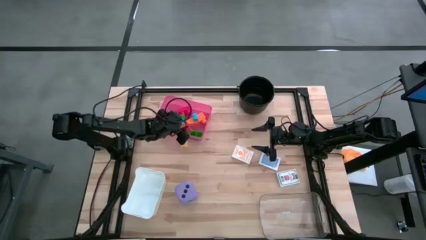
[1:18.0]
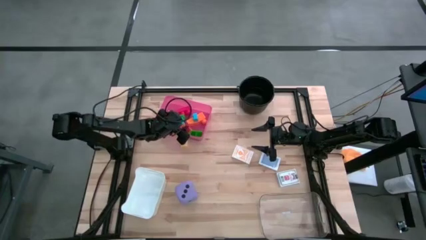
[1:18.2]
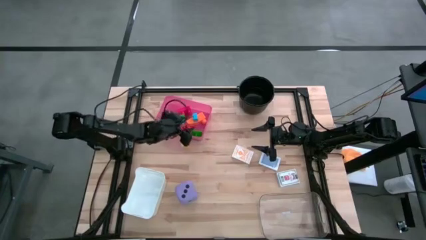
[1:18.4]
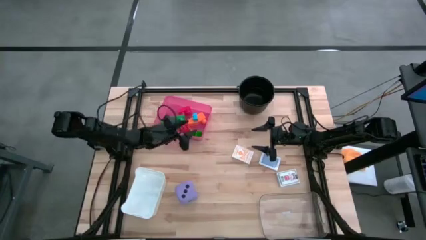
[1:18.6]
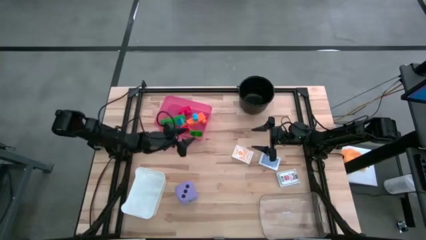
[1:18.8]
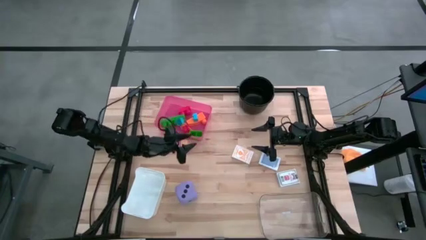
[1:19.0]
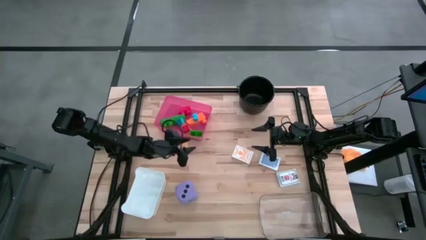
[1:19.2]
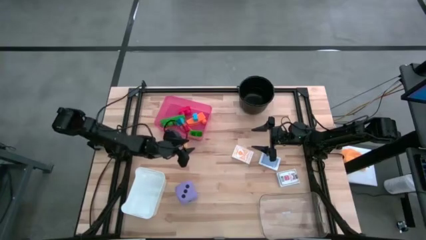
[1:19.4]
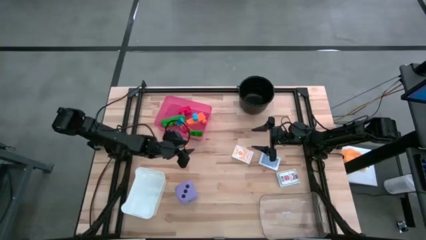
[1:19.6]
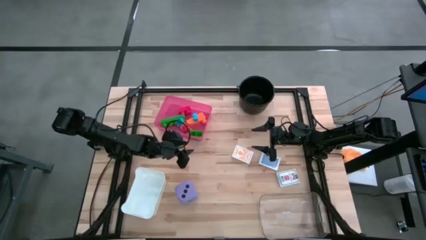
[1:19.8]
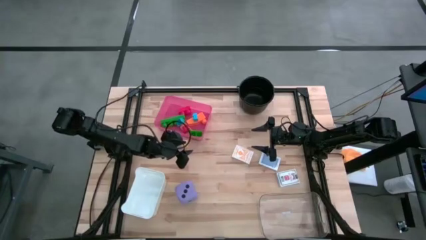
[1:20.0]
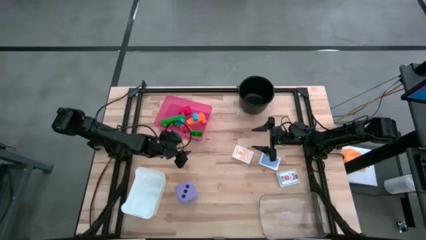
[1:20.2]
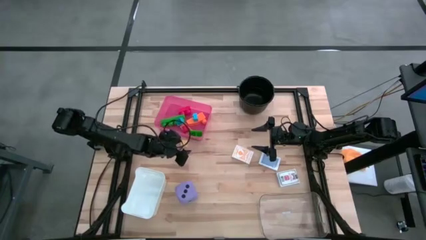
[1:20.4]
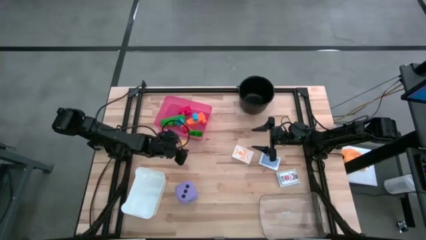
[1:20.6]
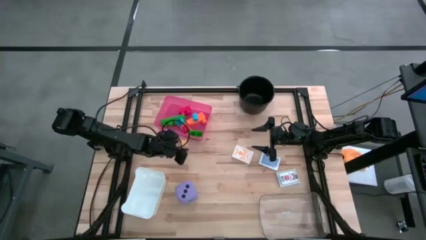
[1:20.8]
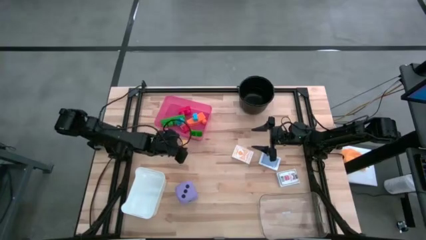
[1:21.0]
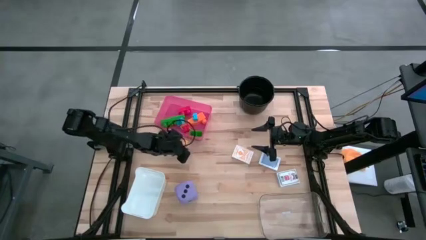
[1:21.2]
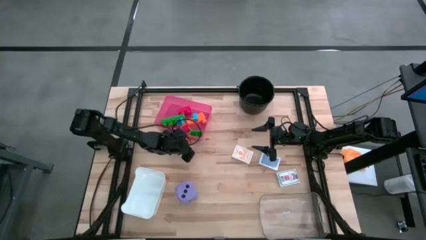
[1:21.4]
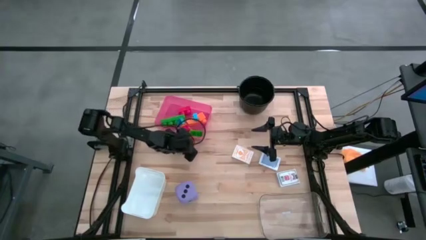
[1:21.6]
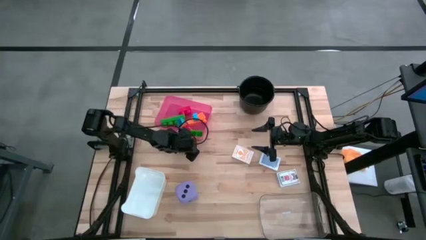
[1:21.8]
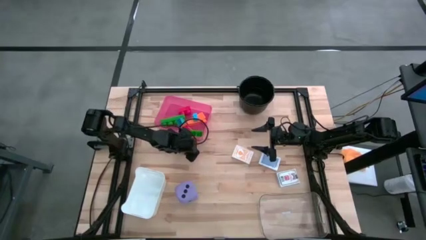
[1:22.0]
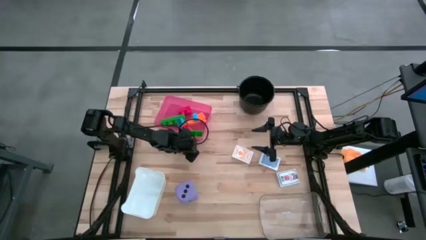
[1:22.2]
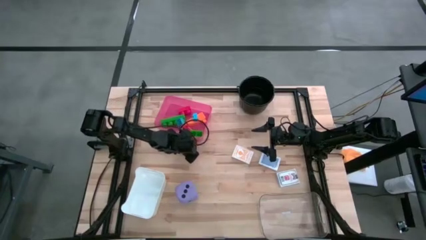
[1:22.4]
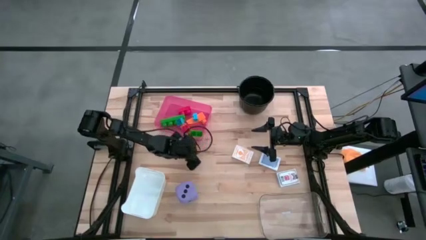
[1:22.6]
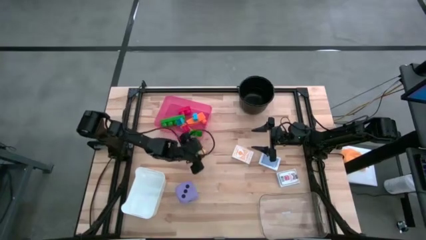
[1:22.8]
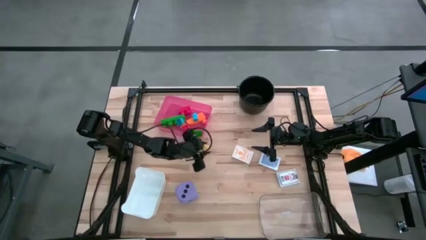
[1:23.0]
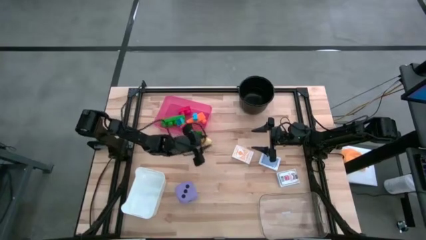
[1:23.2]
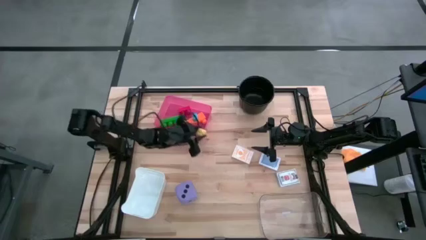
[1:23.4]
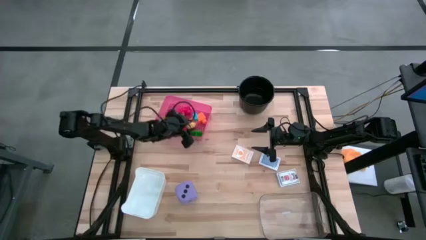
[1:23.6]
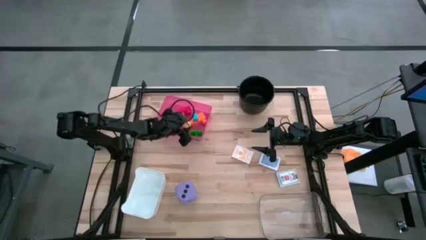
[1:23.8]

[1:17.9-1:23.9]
Task: Pick & Place Toys
Put the yellow game piece into the red bin

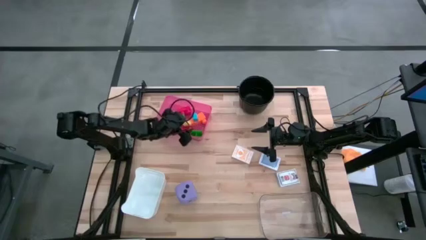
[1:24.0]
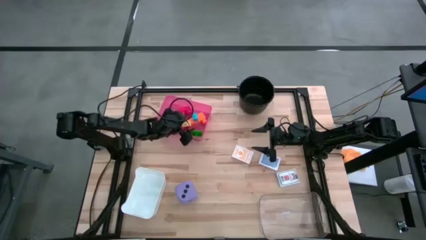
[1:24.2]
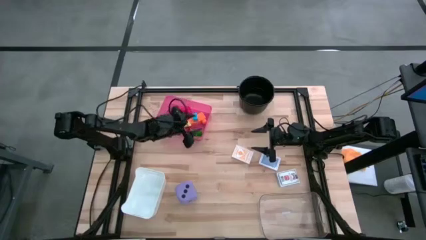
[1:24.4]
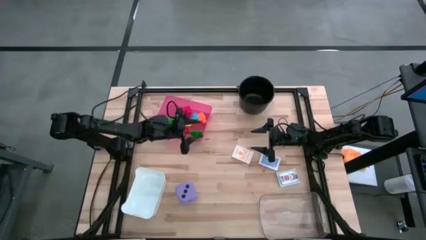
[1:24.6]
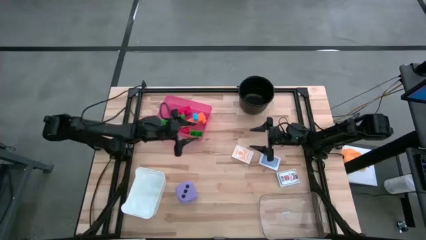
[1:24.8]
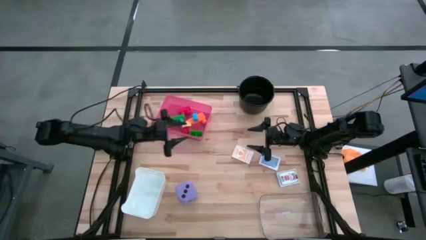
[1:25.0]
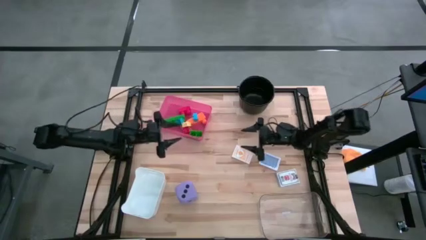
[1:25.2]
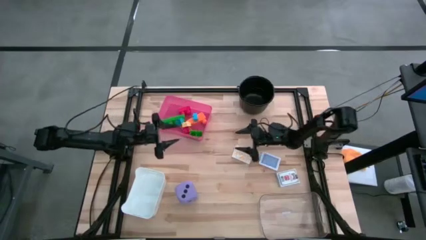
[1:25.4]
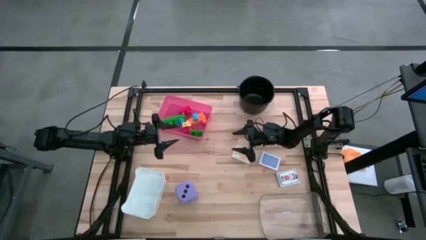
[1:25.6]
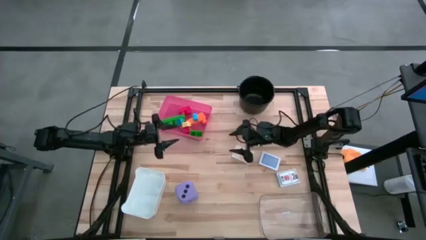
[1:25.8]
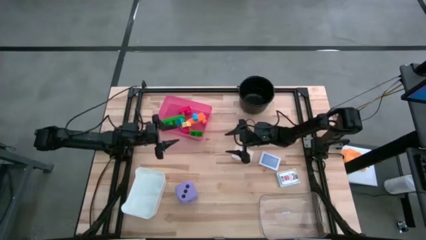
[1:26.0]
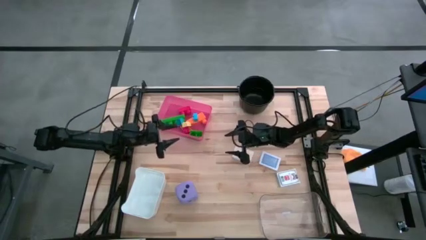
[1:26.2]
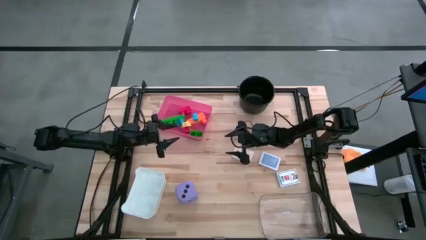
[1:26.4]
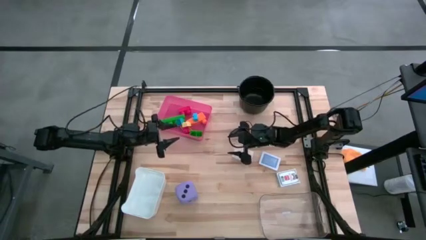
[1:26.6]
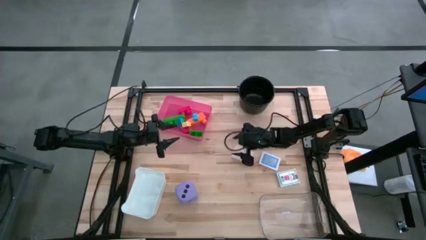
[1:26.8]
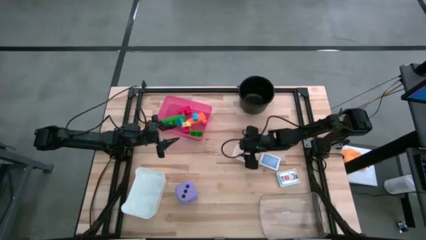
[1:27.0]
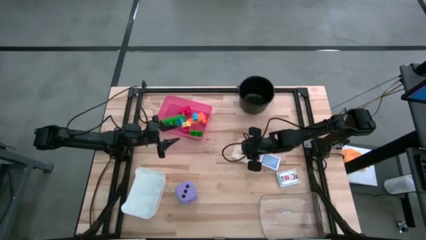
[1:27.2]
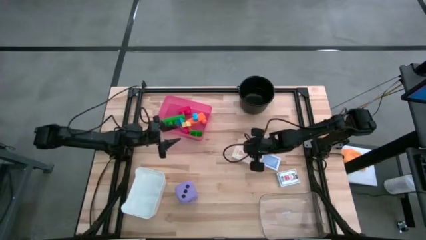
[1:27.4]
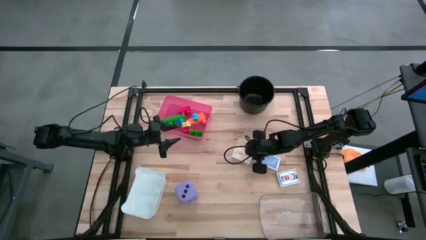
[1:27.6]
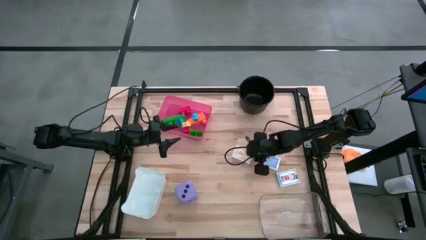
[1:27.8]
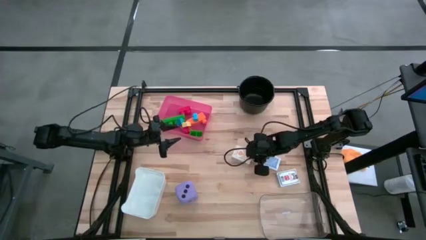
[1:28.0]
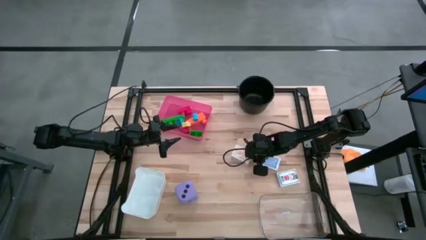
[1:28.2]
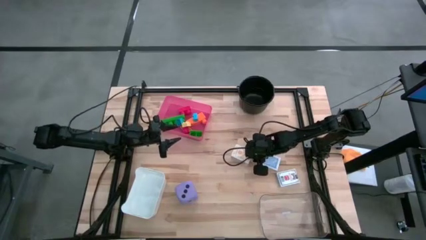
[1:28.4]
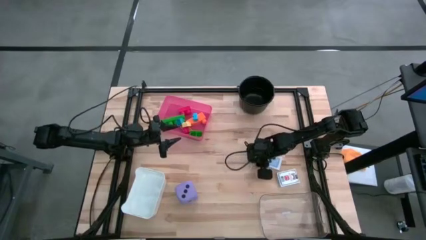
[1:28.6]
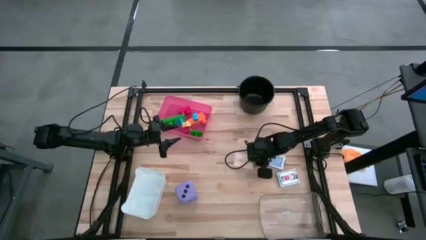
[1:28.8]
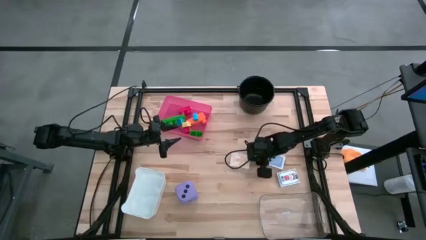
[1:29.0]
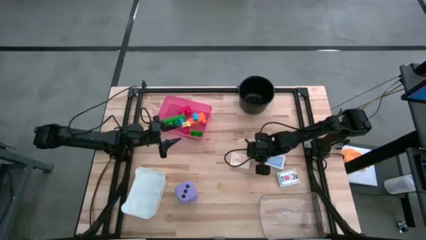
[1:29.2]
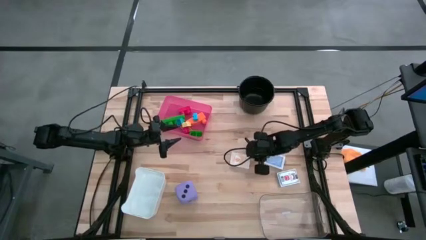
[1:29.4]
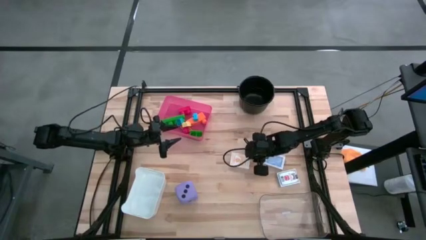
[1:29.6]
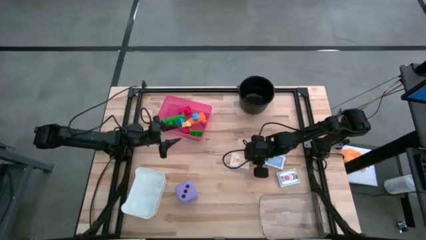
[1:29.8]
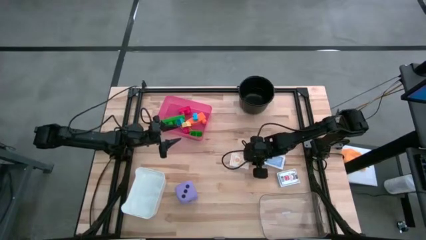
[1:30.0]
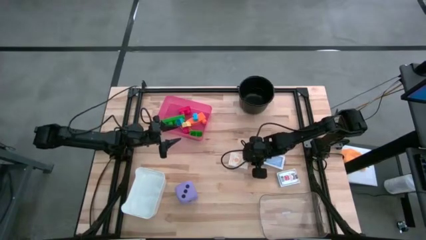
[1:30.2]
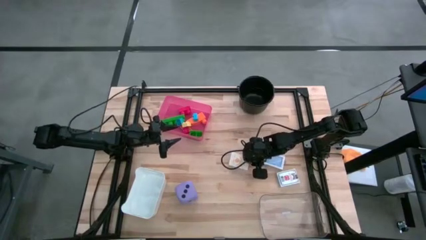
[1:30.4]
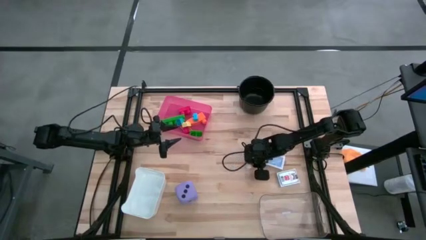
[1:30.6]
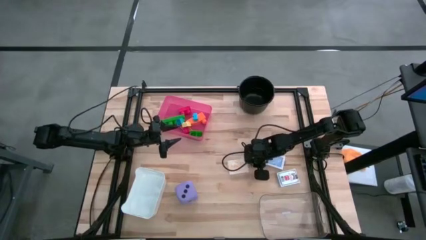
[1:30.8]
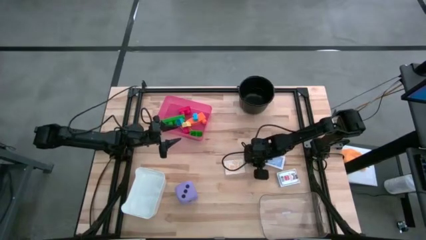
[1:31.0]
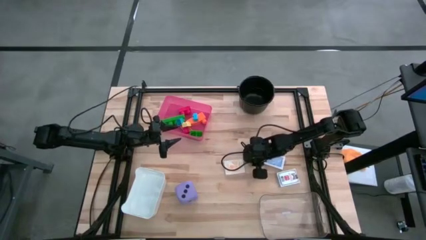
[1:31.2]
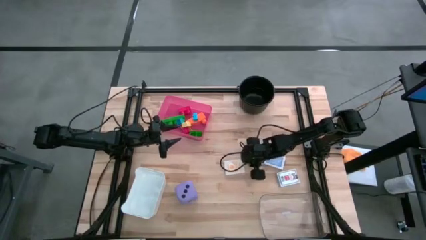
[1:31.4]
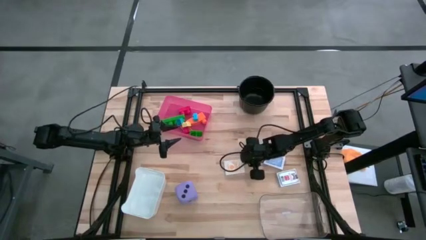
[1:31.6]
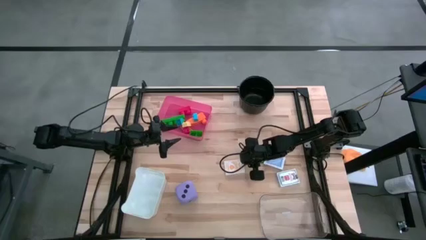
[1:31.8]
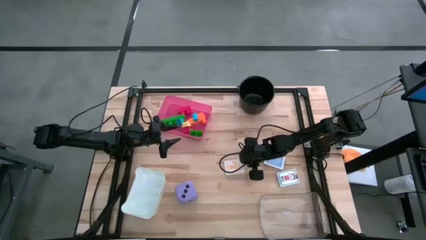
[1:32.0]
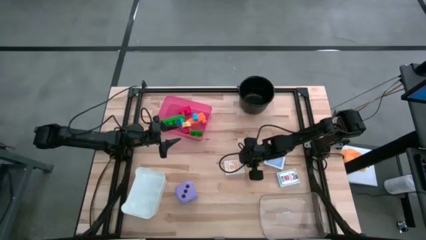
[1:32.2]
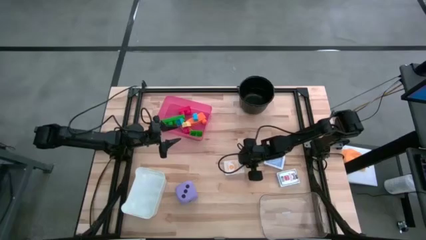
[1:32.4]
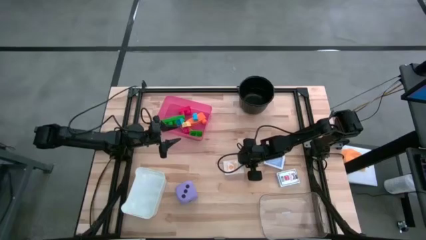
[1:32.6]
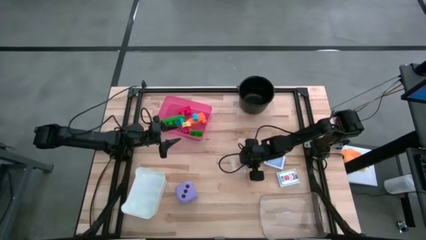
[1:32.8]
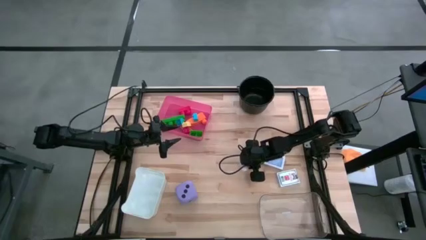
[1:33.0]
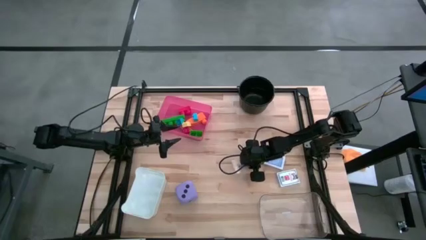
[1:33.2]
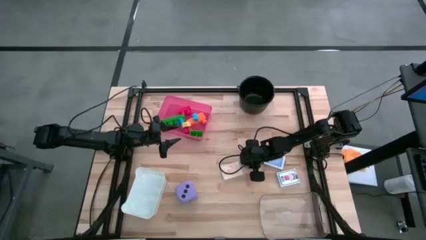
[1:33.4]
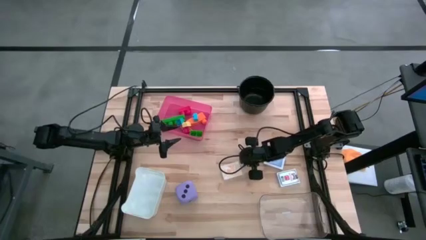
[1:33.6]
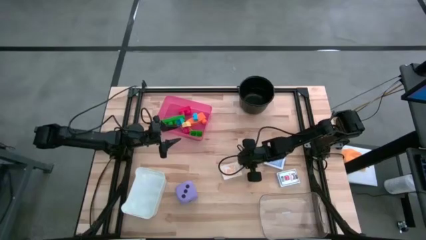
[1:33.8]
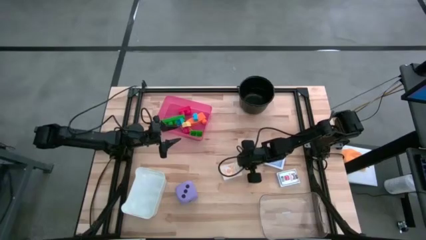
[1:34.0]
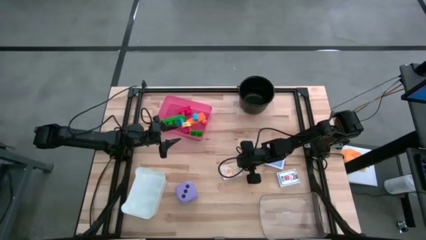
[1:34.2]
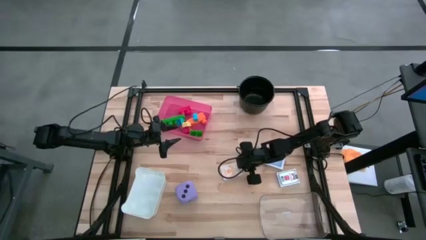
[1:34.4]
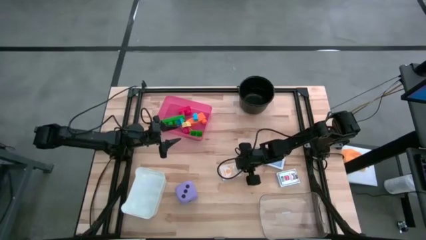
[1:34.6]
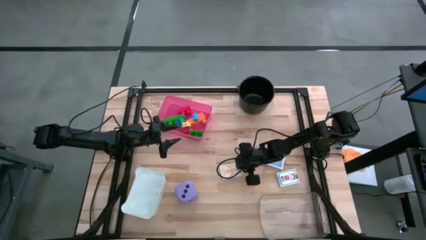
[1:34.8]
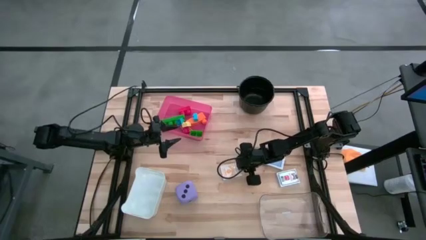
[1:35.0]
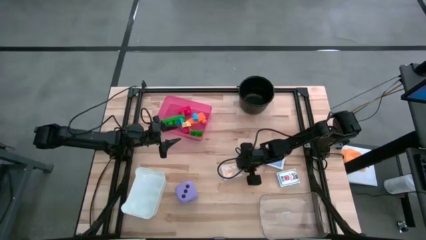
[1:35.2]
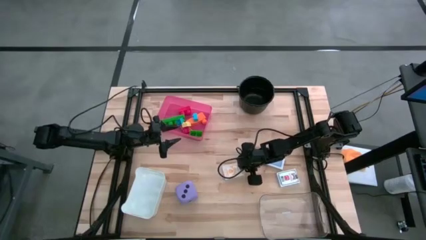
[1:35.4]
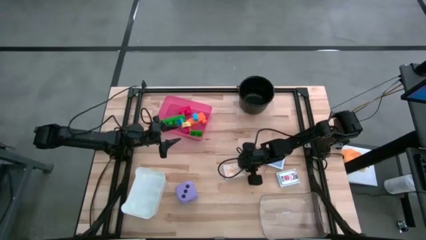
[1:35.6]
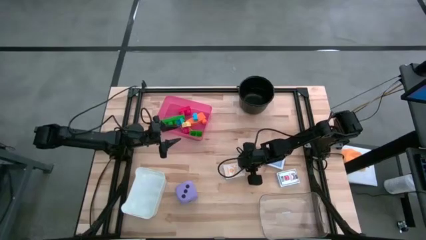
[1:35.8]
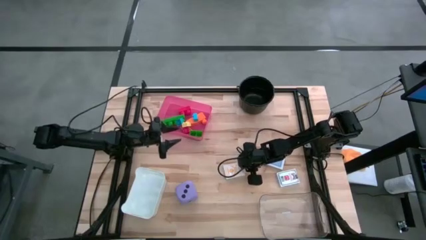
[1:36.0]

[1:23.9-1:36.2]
Put the yellow deck of cards into the transparent bin
